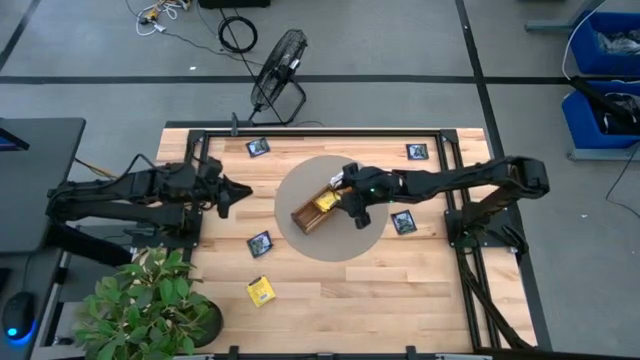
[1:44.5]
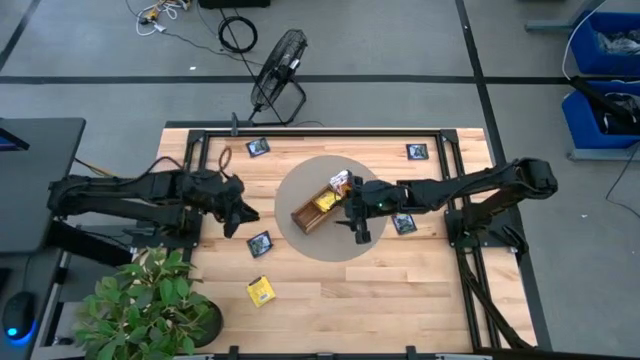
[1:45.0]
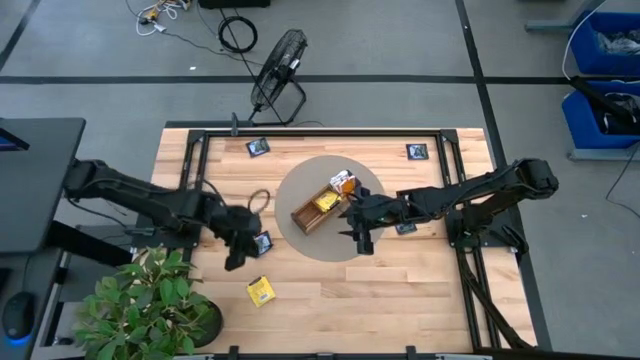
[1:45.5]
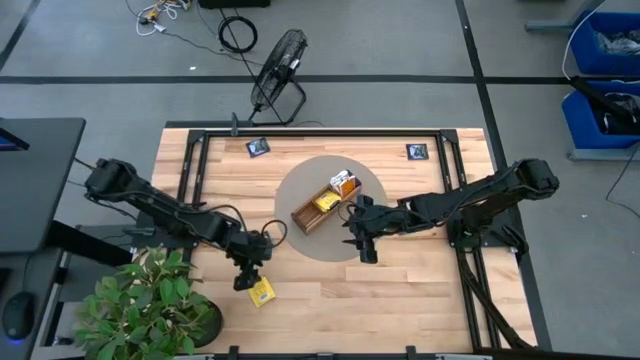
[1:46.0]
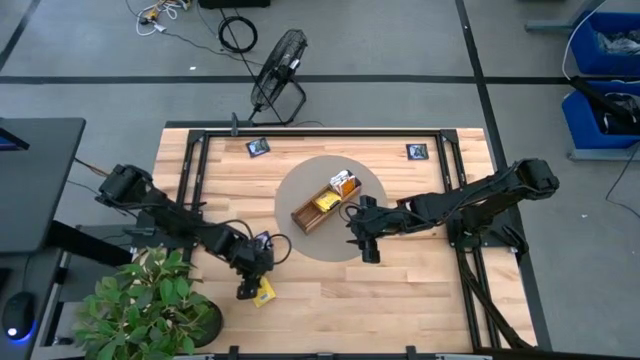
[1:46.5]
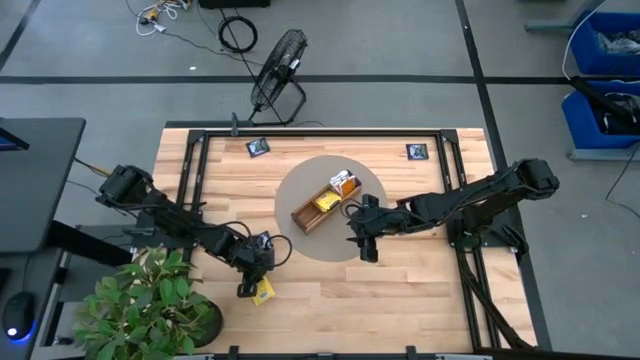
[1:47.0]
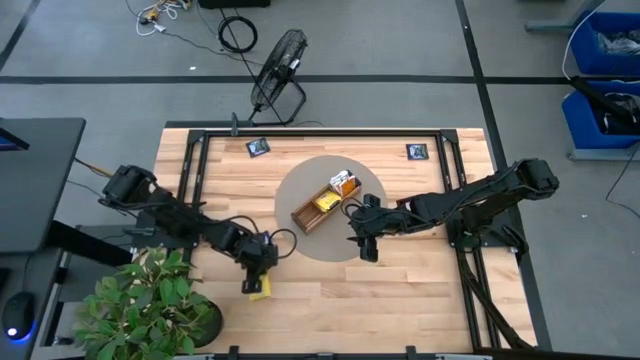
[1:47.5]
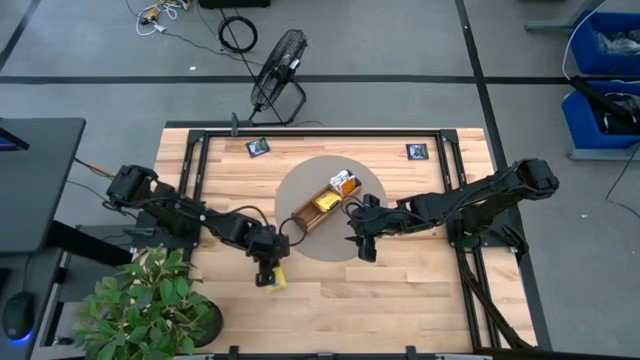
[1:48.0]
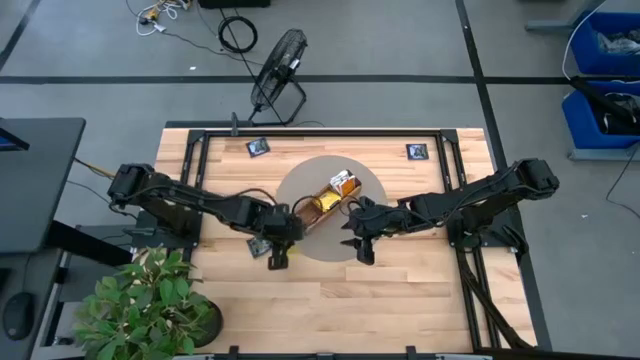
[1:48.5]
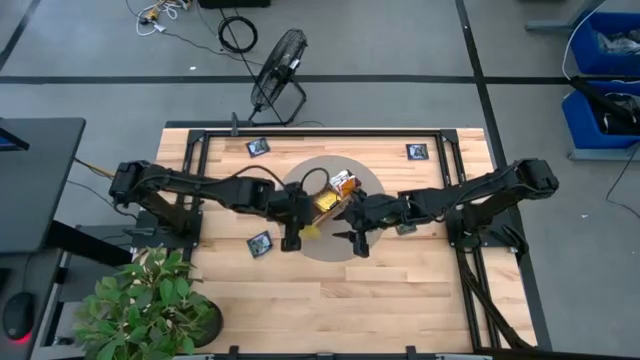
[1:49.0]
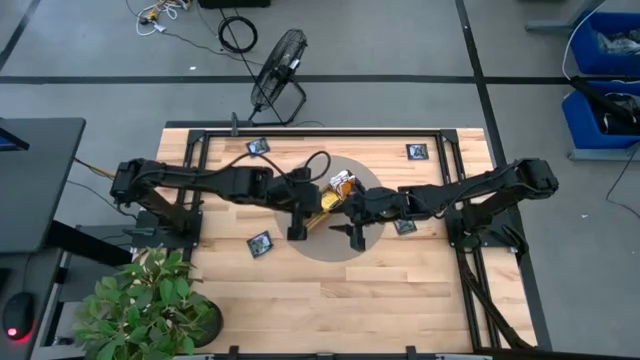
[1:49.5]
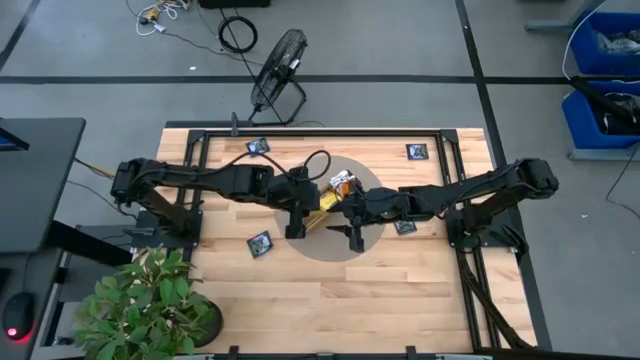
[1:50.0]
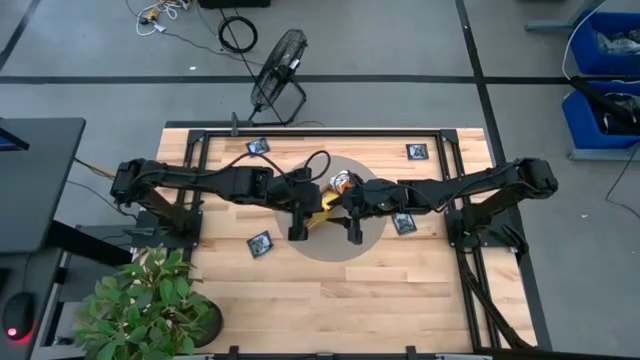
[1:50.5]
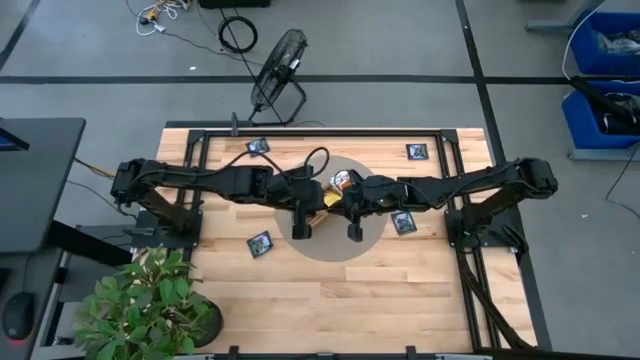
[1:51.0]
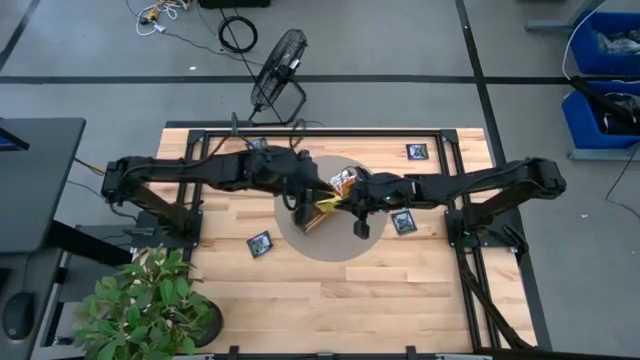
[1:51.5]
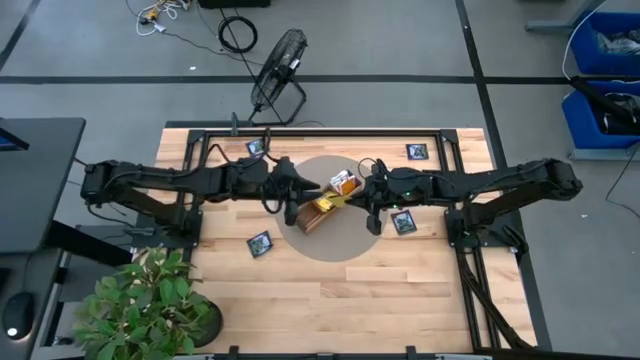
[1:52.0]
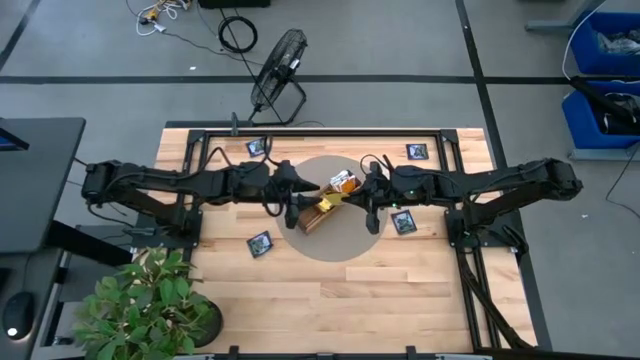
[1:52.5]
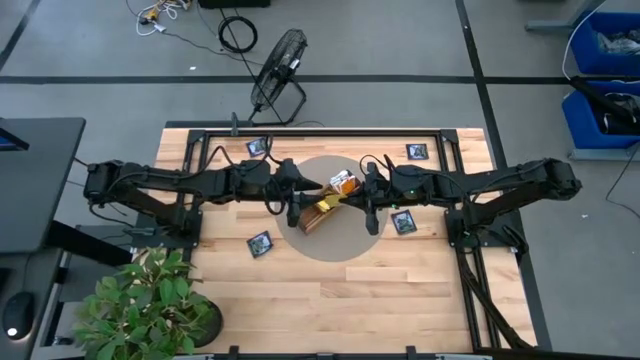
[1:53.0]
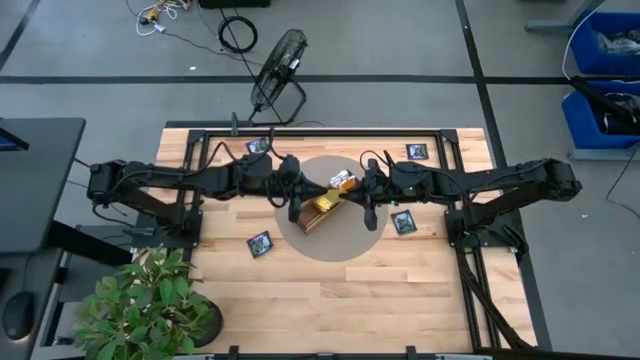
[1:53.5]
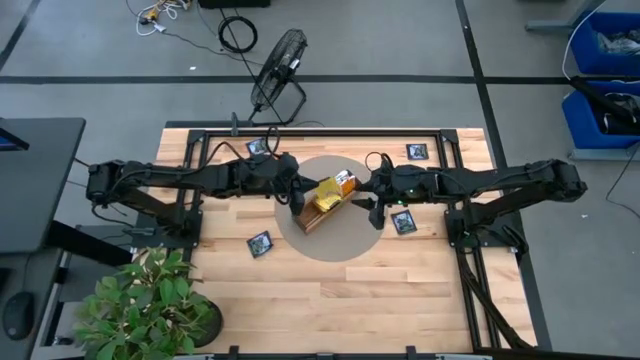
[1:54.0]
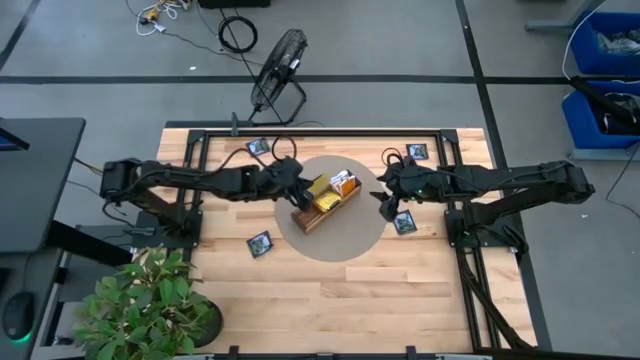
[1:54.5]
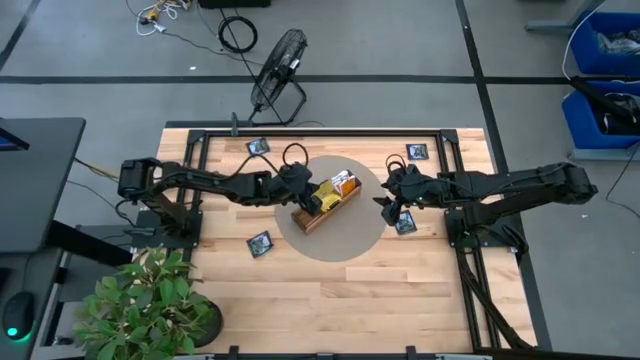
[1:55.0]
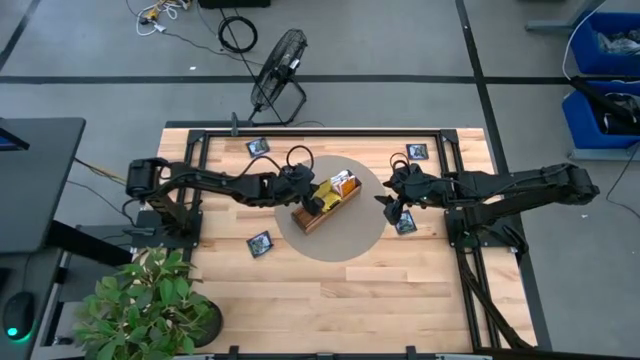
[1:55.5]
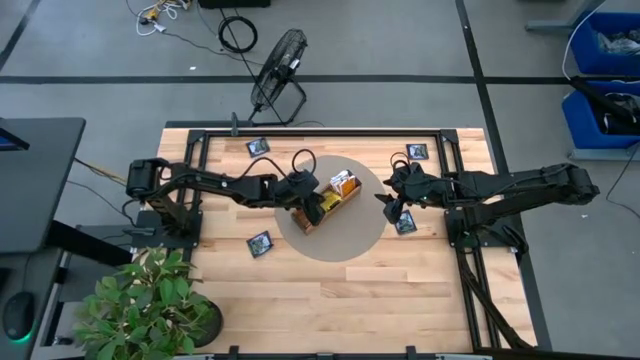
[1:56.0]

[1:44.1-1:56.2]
Task: Pick & Place Tea
Put the yellow tea bag into the middle section of the wooden organizer

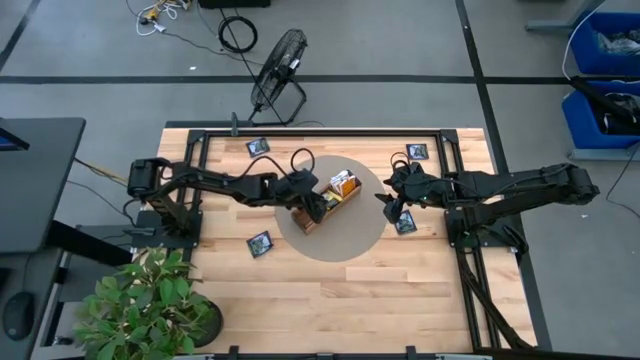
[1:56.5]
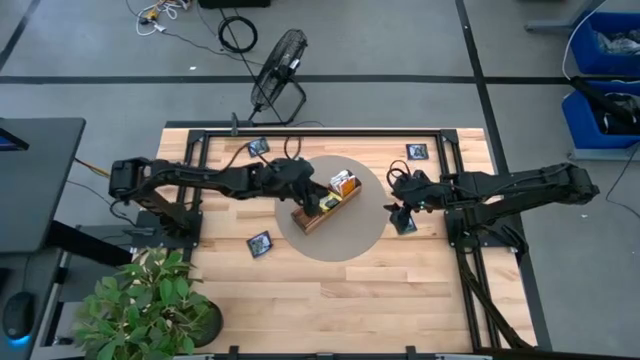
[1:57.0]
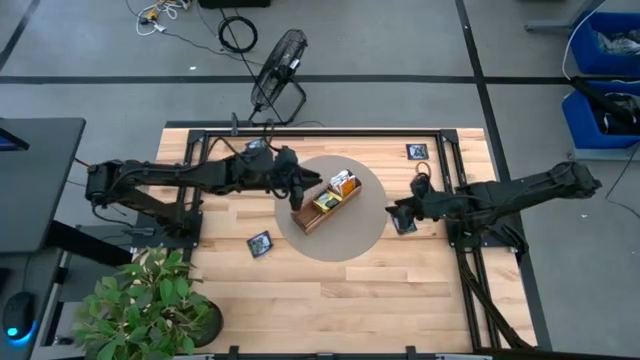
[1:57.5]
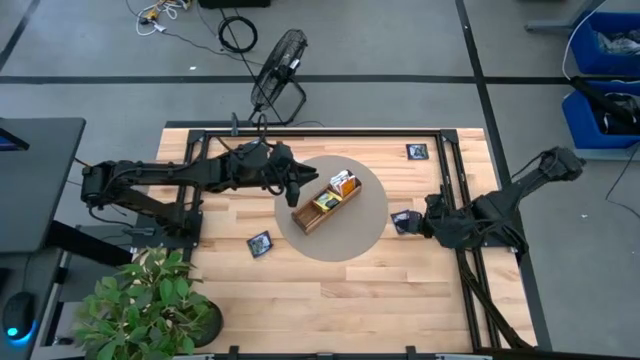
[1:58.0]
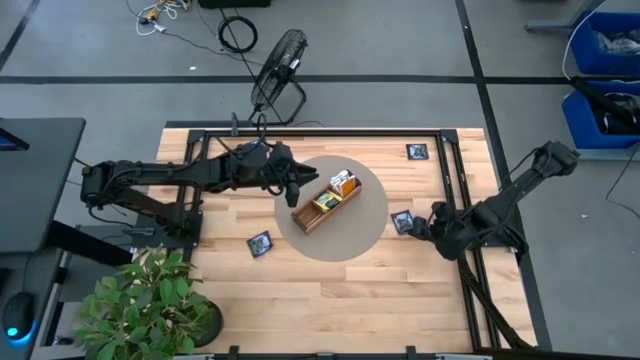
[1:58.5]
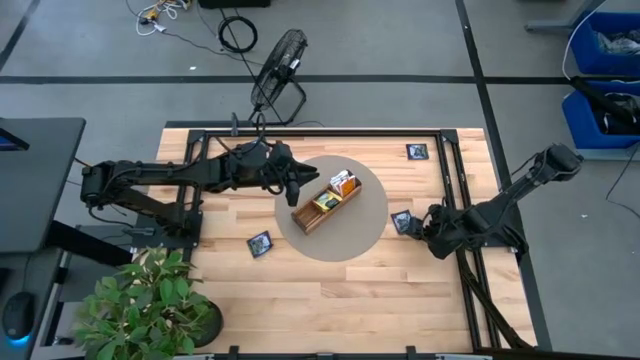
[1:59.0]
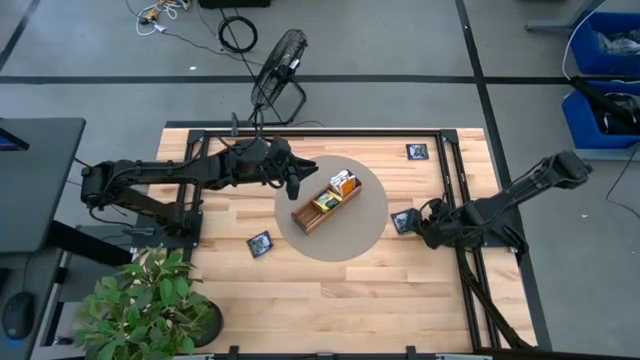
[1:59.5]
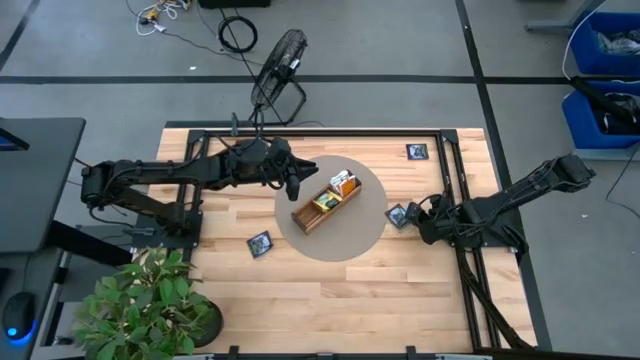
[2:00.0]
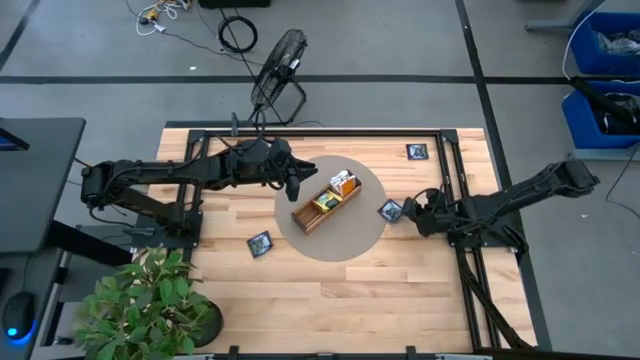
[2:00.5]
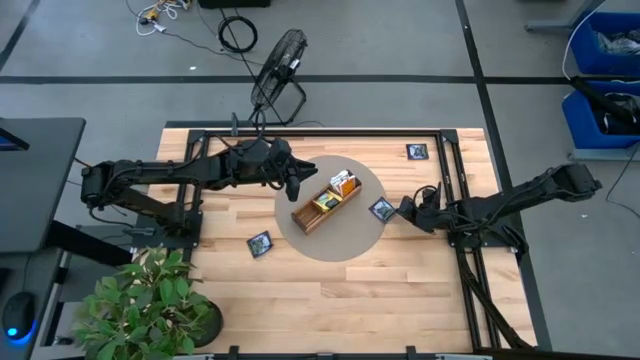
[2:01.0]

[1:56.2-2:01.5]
Put the black tea bag into the left section of the wooden organizer

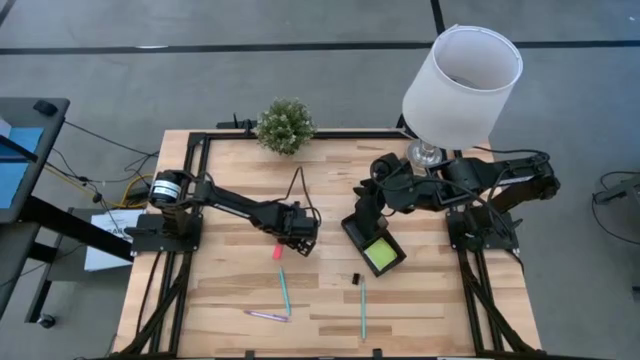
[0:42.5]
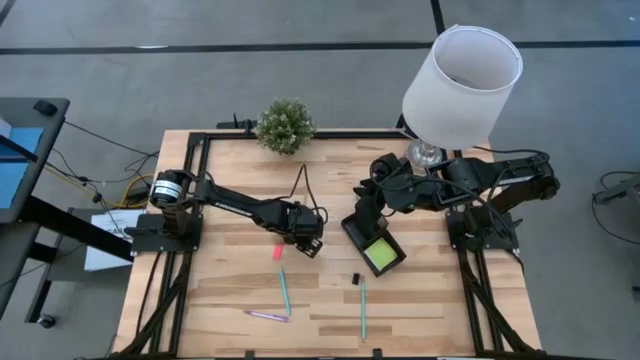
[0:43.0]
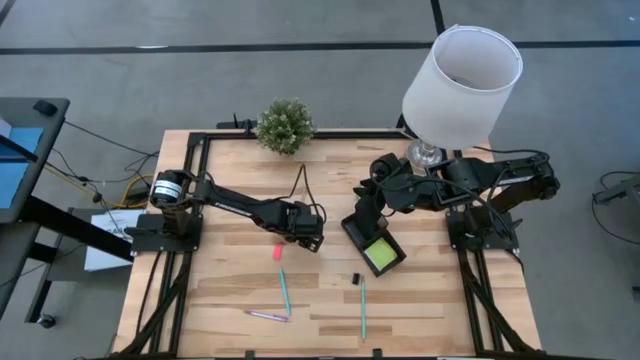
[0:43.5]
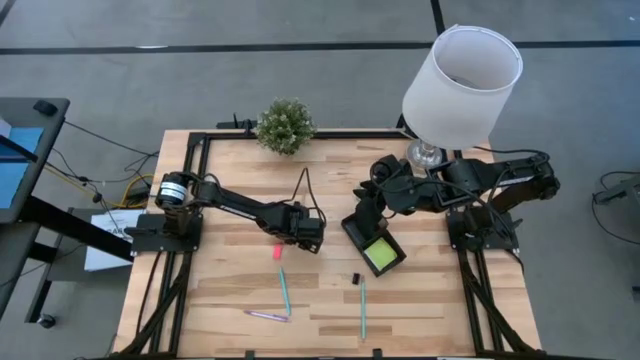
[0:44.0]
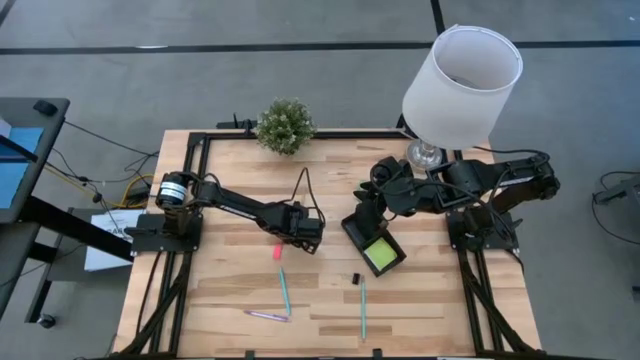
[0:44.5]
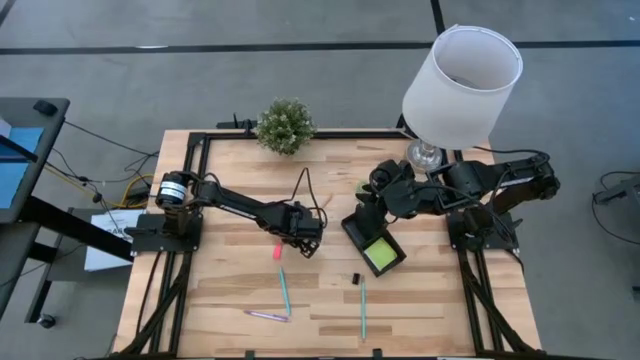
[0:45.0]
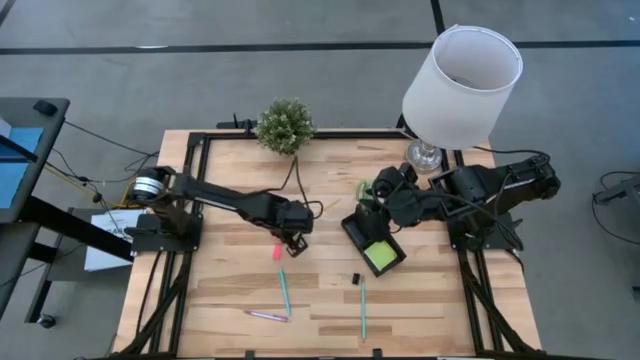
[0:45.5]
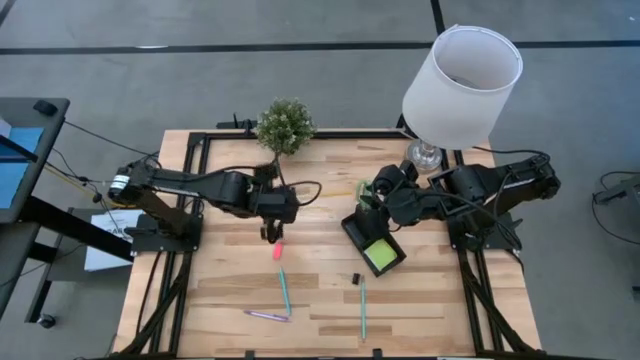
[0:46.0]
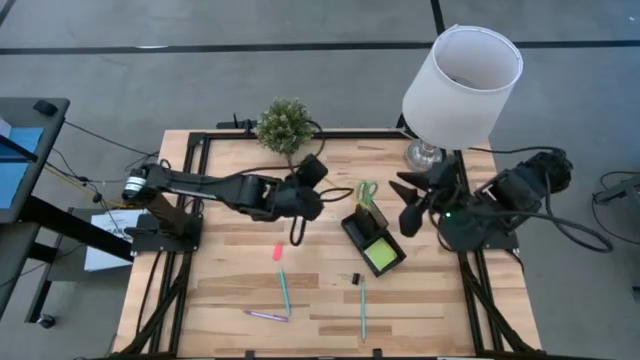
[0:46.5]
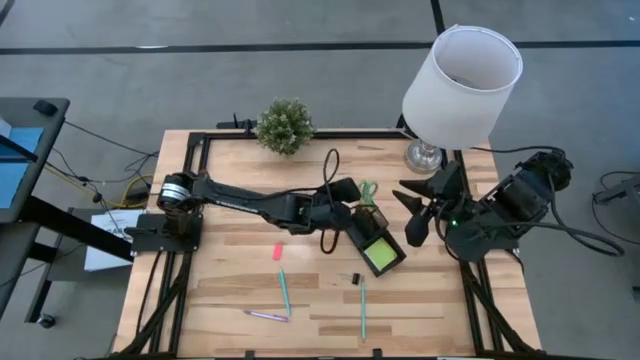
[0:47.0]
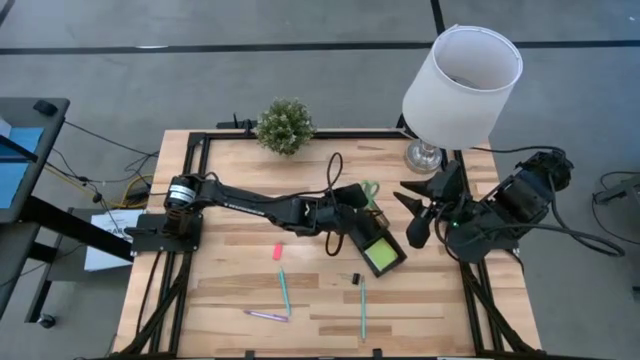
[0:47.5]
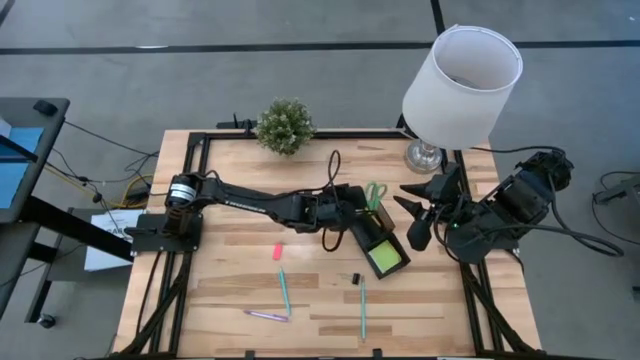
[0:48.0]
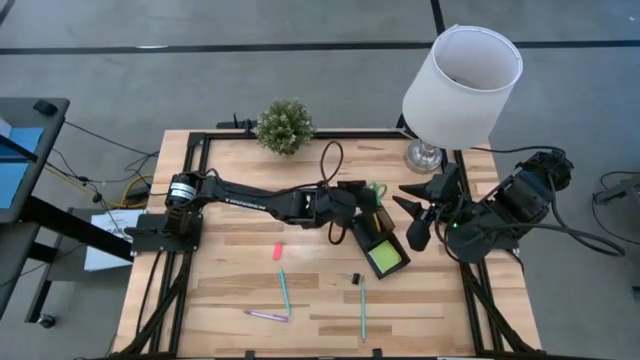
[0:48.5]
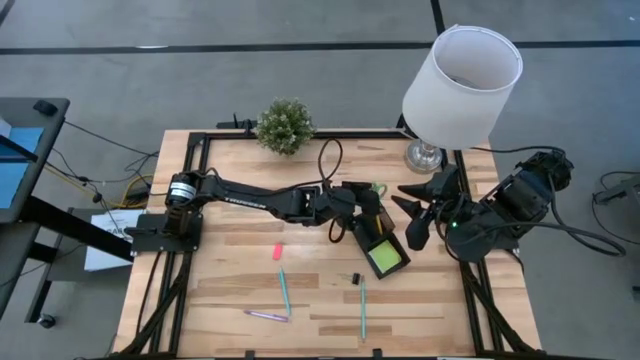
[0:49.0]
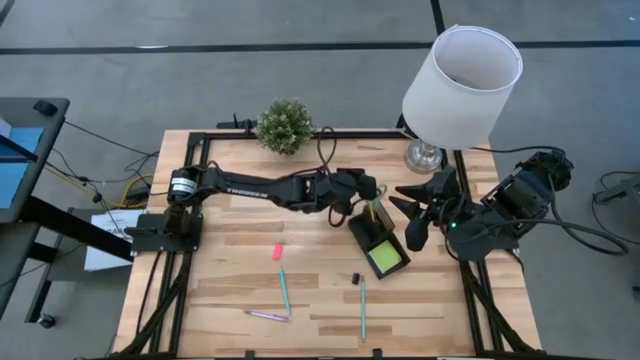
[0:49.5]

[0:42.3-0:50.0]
Task: Pick and place office supplies into organizer
Put the yellow pencil into the black desk organizer
